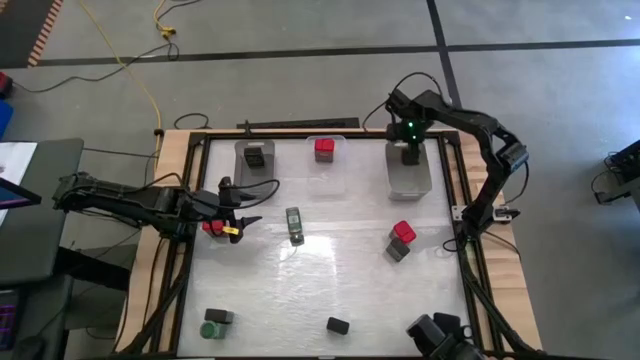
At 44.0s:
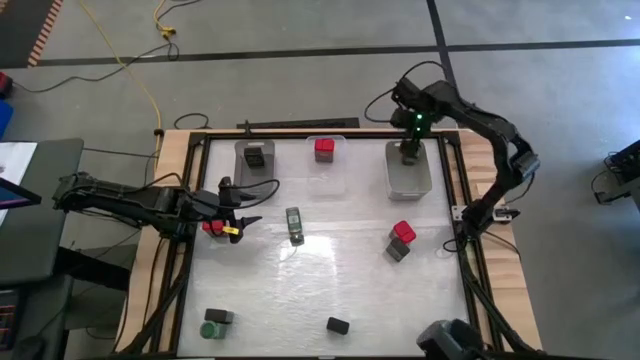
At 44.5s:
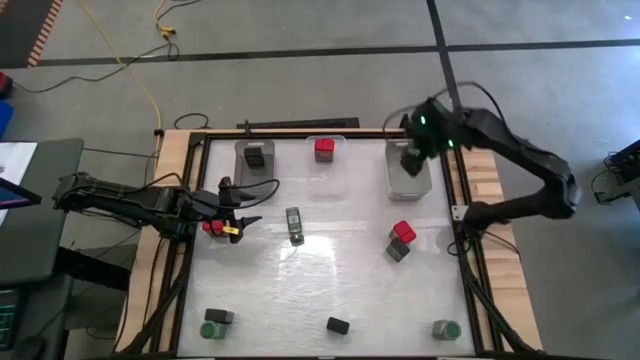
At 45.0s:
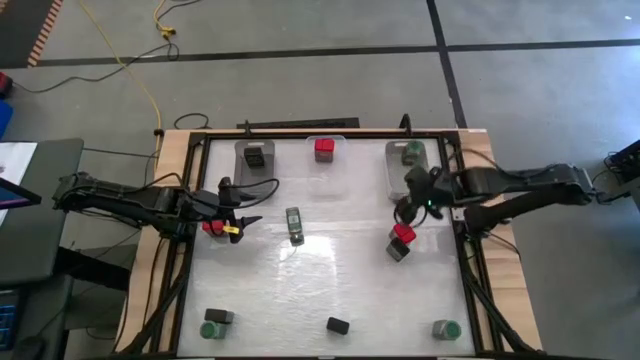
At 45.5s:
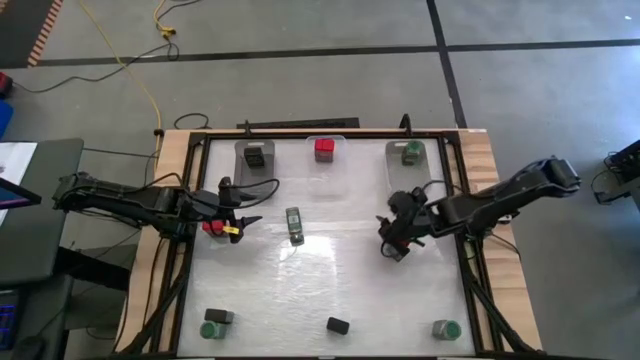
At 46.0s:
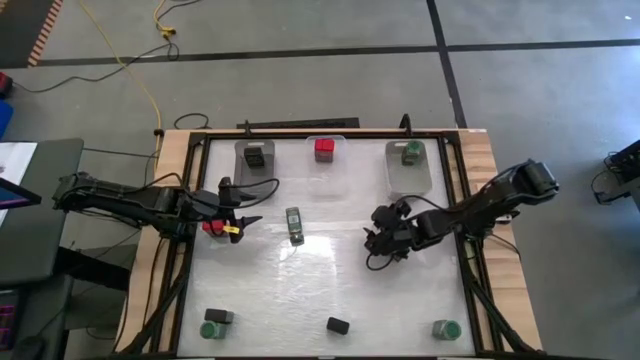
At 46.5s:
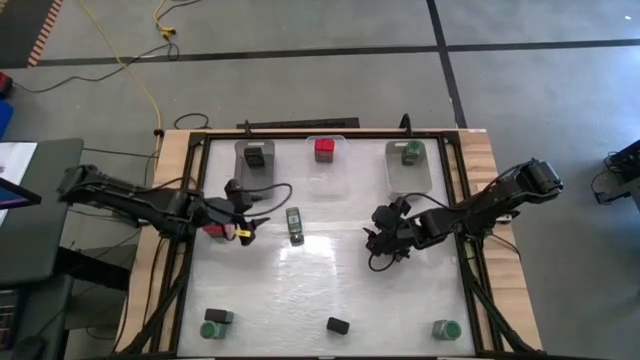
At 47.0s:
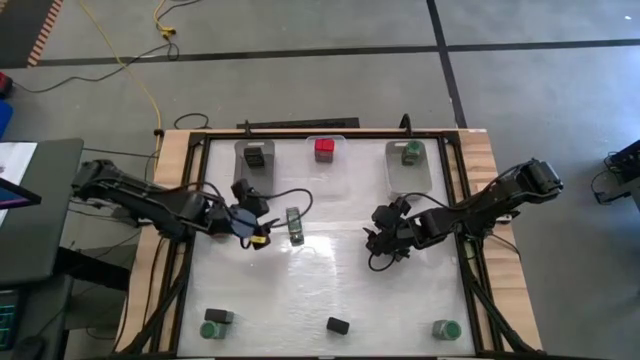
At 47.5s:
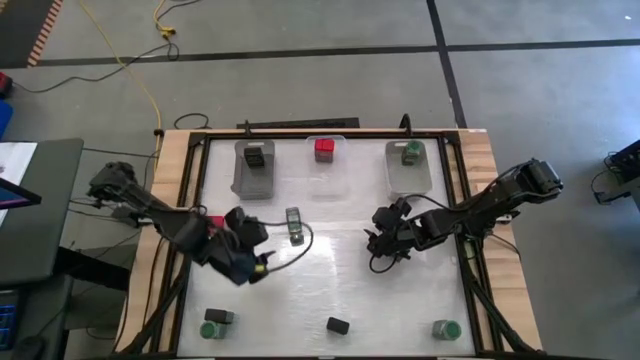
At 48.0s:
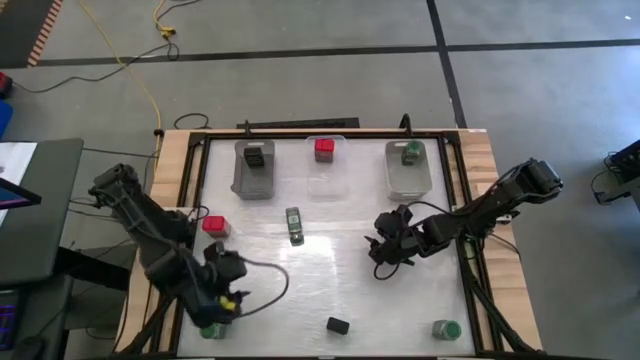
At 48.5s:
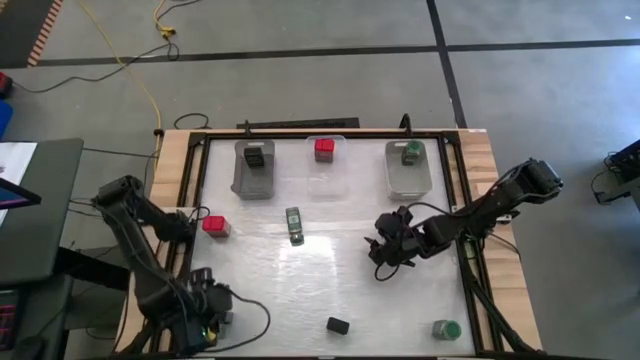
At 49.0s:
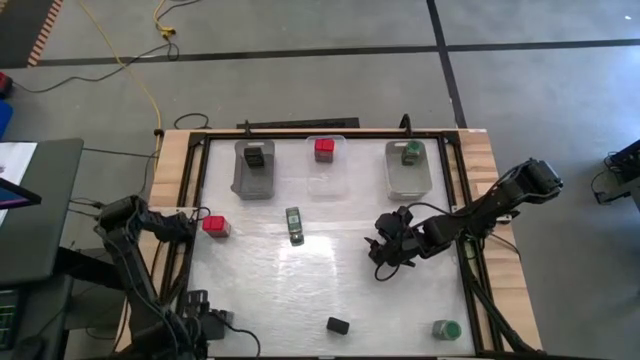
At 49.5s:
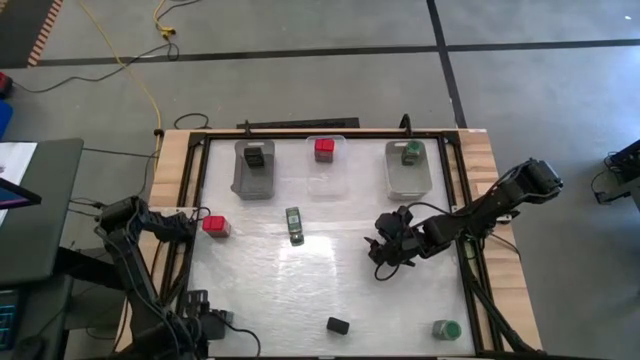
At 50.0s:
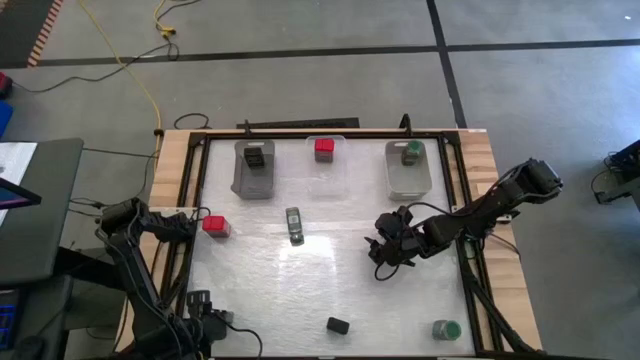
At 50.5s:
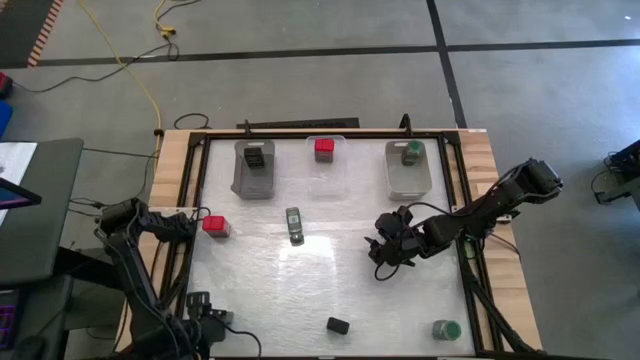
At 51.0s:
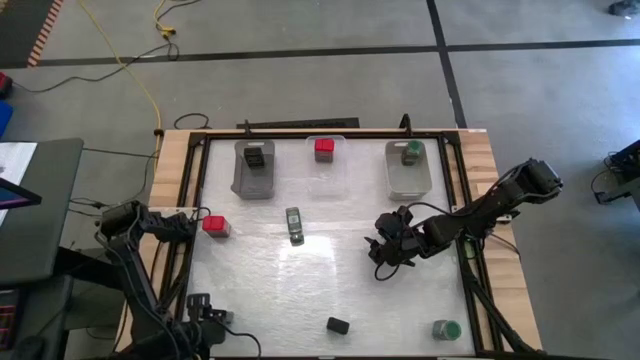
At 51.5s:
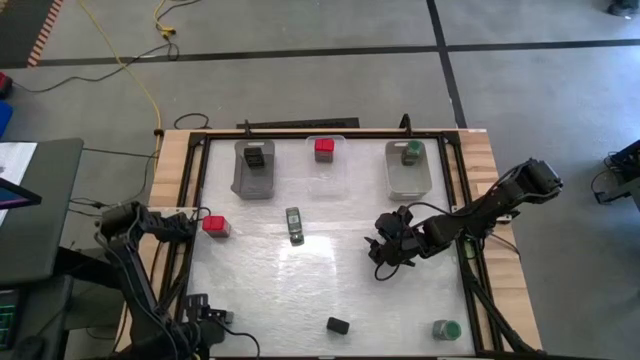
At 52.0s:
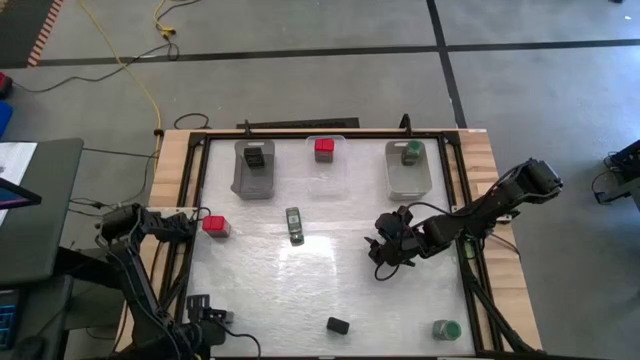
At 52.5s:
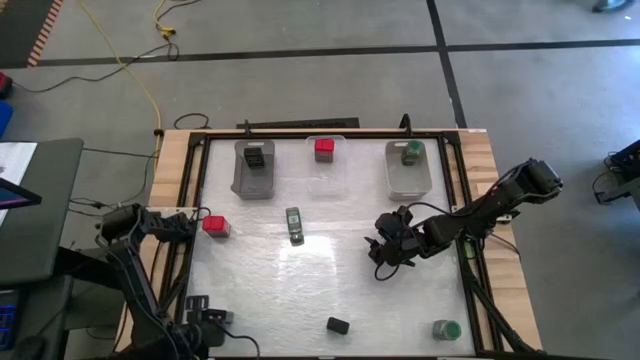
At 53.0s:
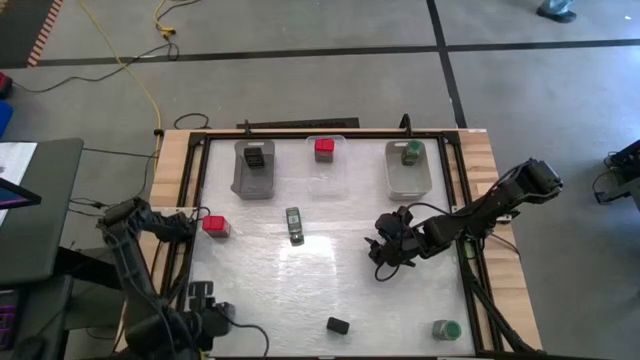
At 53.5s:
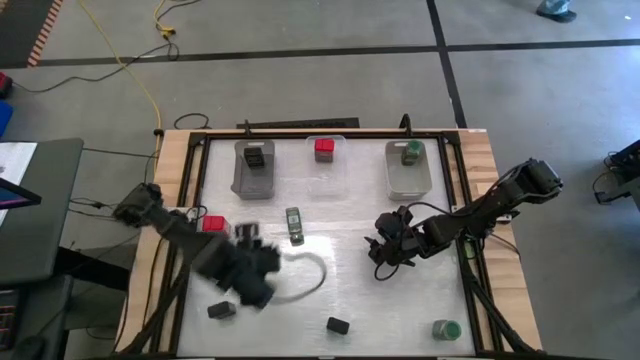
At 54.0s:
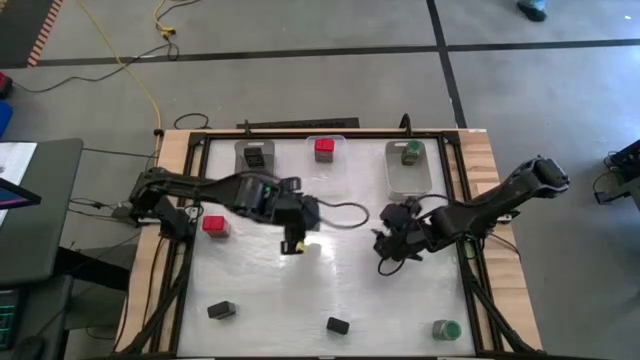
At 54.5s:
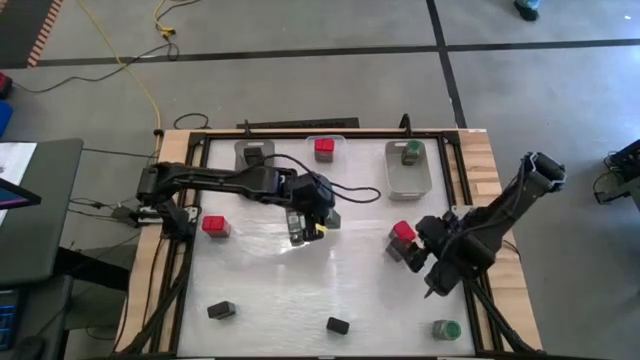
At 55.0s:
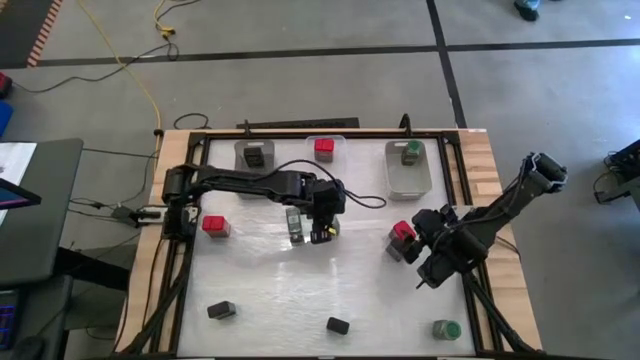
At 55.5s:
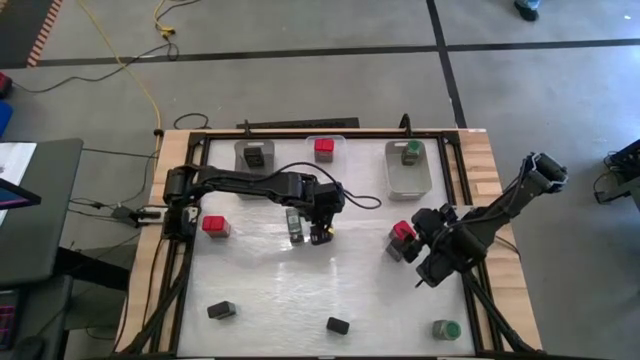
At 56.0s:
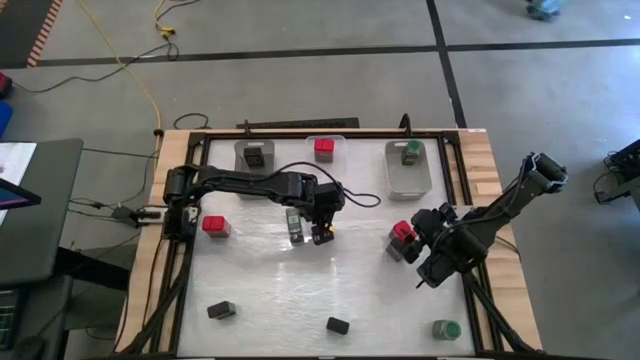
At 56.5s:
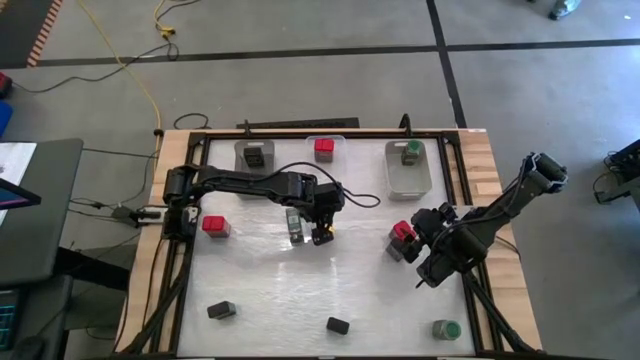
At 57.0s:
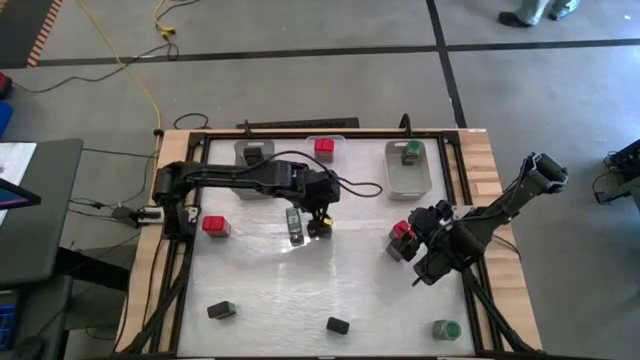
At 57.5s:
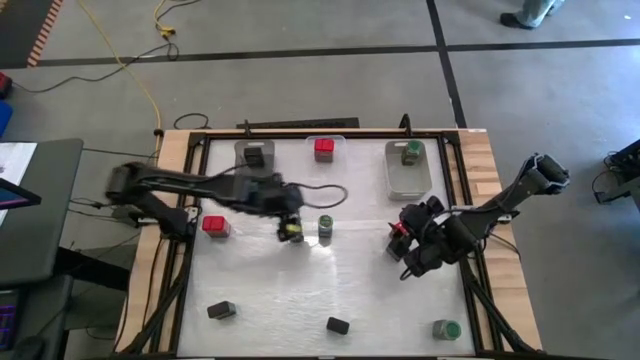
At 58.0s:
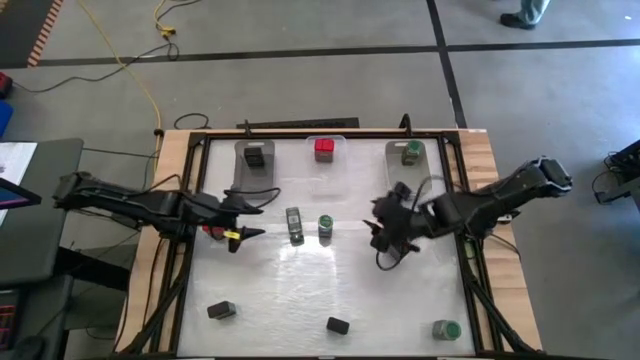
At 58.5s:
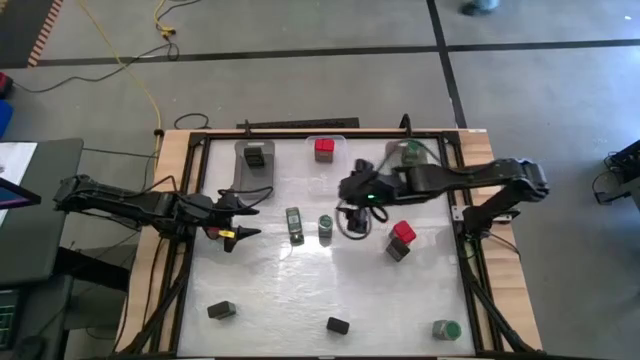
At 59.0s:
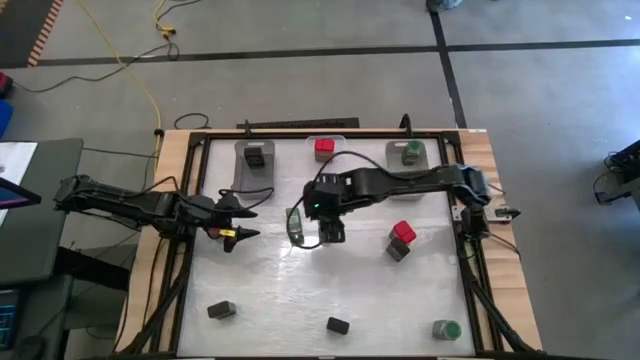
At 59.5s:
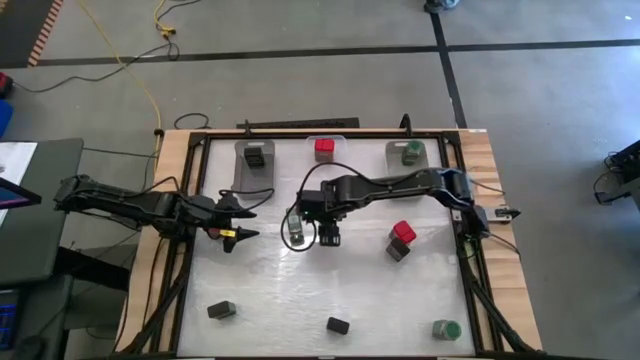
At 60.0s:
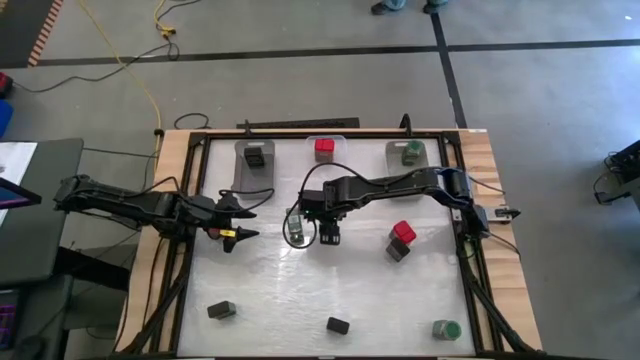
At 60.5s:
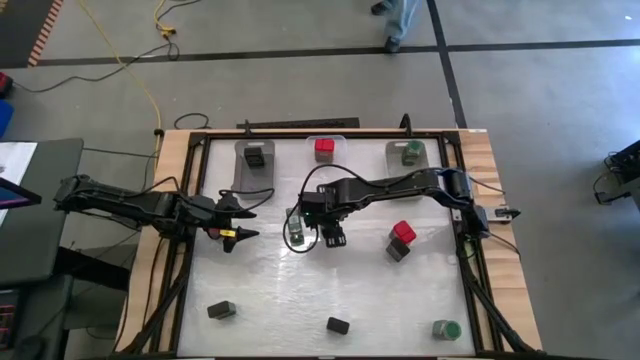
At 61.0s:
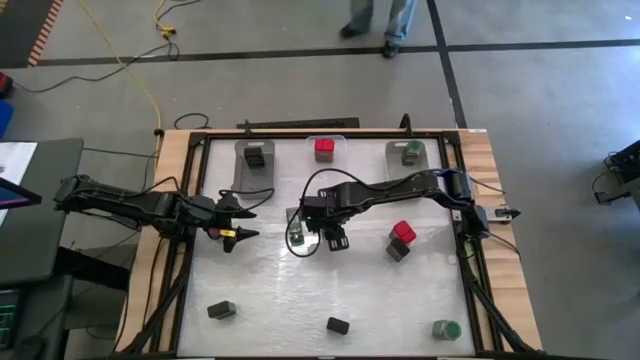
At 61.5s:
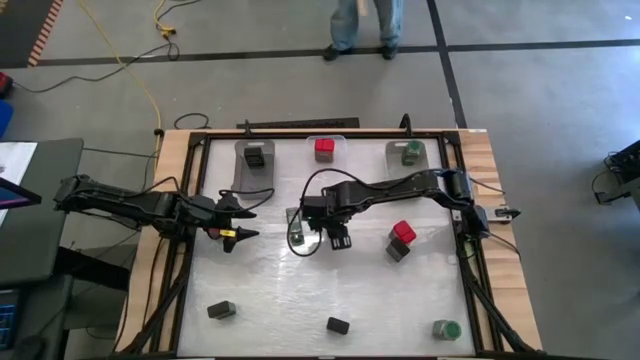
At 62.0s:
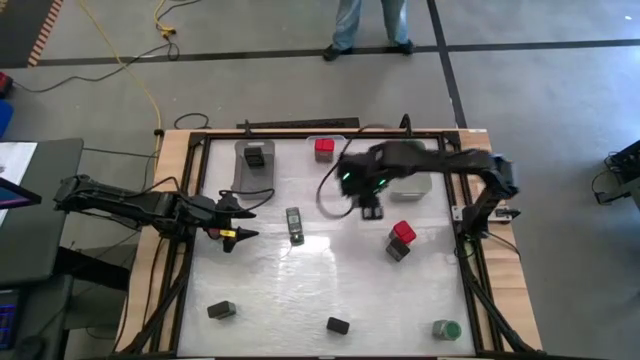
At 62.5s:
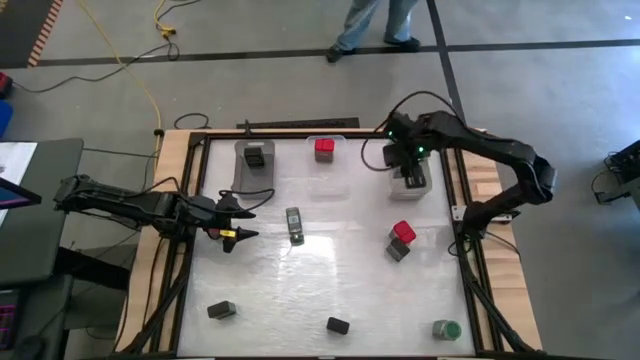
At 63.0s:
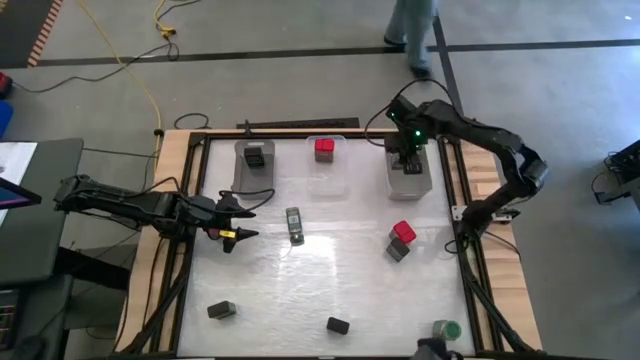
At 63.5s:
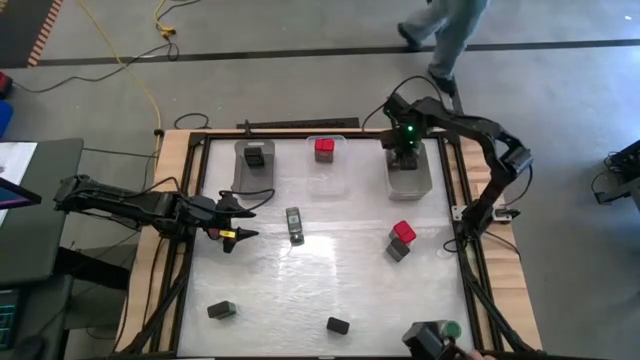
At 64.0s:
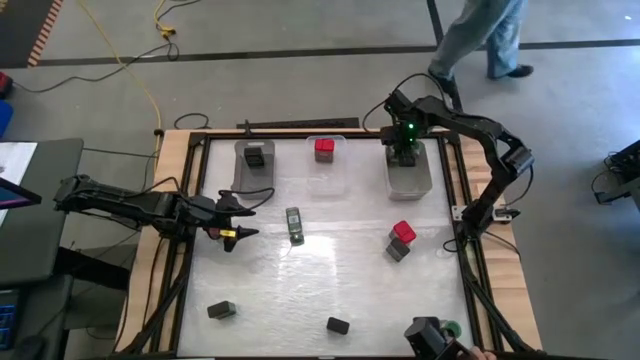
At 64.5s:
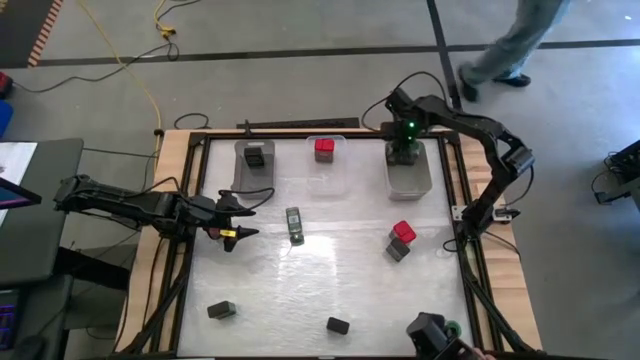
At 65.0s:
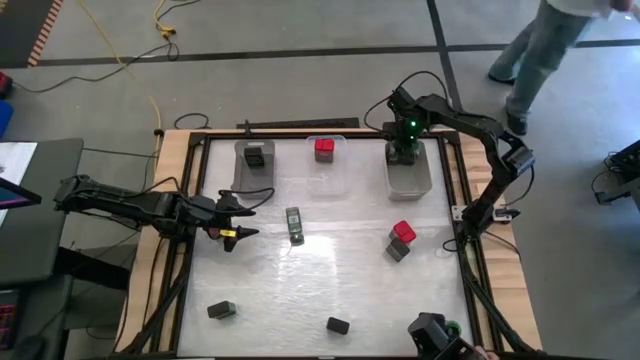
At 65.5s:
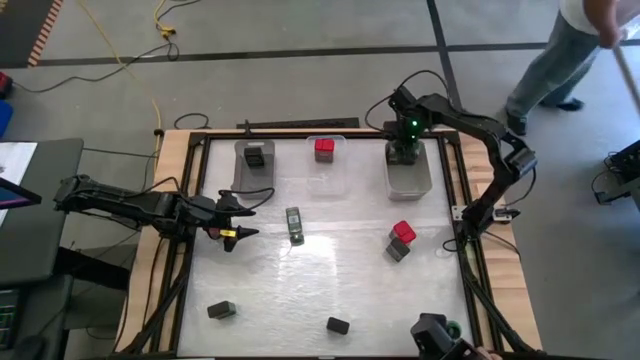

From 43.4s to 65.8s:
Task: Sort spices by type
Put the green seasoning bottle into the gray bin
